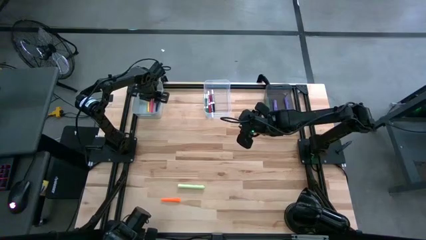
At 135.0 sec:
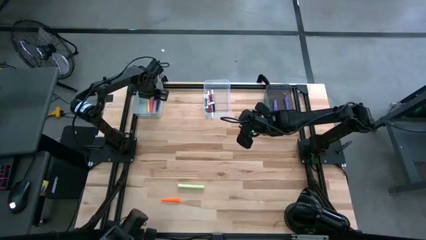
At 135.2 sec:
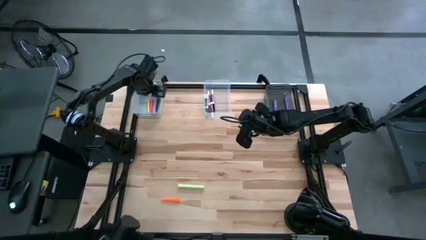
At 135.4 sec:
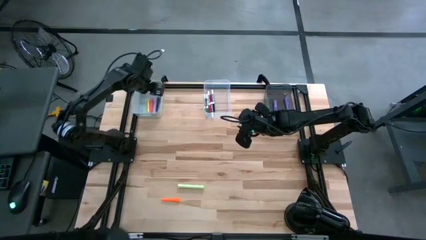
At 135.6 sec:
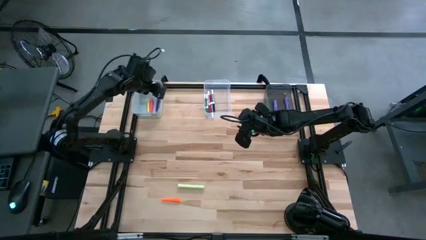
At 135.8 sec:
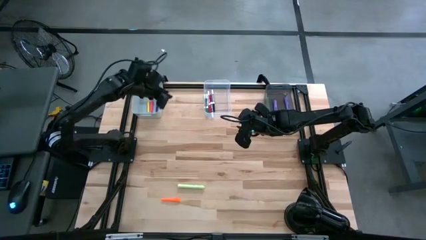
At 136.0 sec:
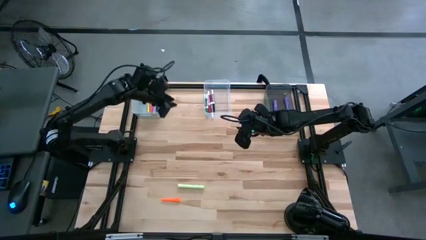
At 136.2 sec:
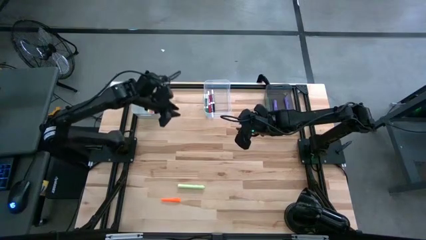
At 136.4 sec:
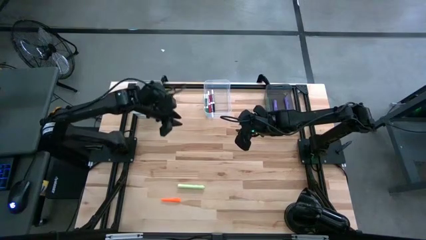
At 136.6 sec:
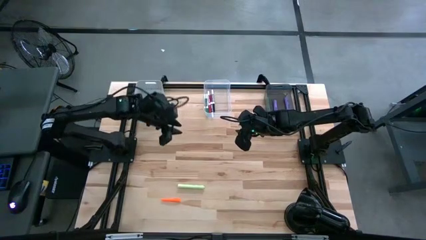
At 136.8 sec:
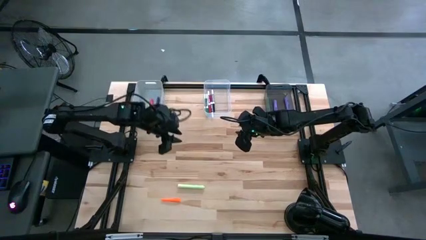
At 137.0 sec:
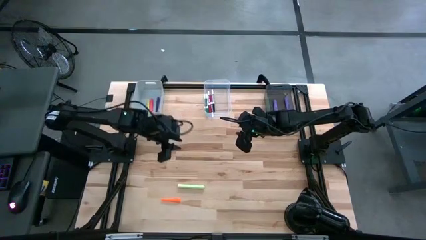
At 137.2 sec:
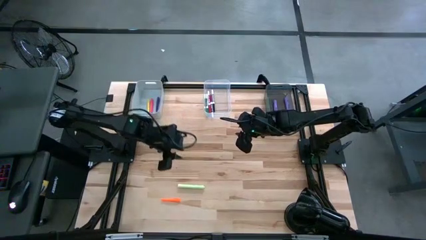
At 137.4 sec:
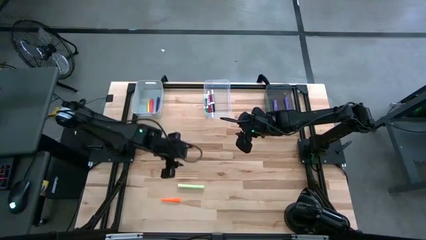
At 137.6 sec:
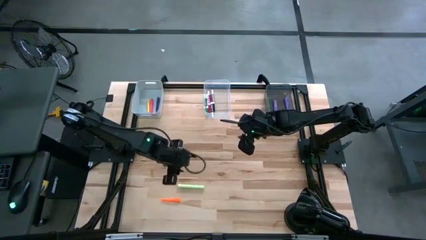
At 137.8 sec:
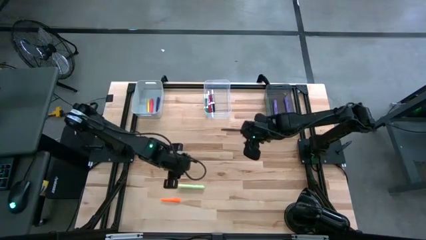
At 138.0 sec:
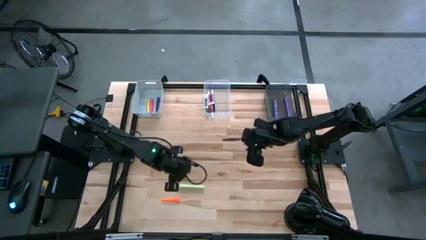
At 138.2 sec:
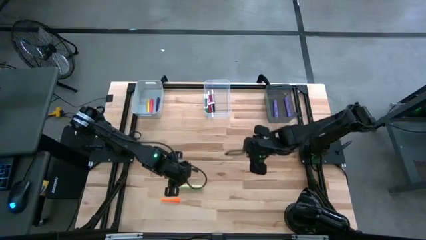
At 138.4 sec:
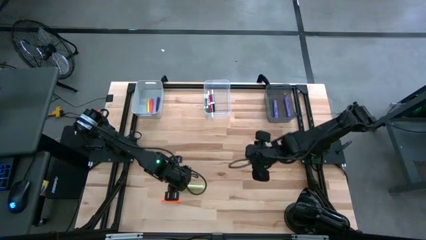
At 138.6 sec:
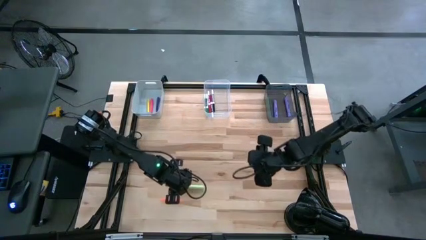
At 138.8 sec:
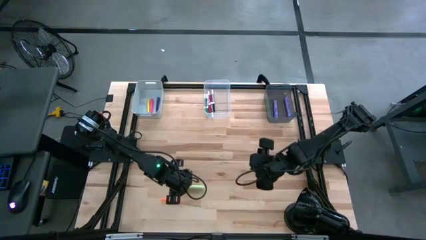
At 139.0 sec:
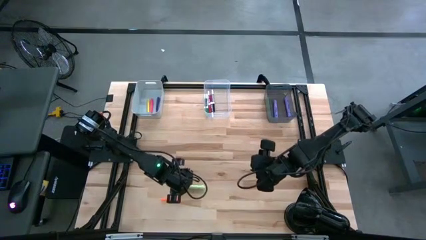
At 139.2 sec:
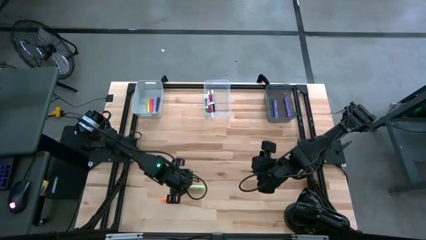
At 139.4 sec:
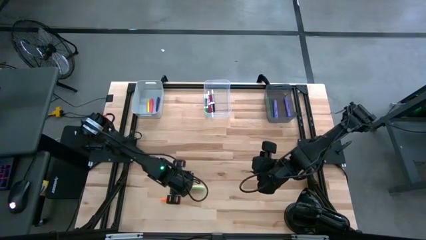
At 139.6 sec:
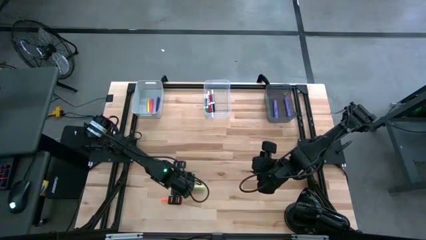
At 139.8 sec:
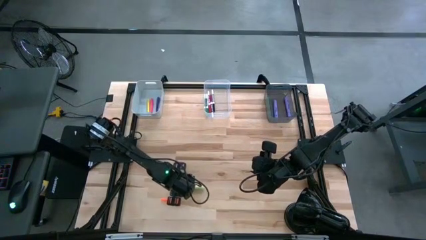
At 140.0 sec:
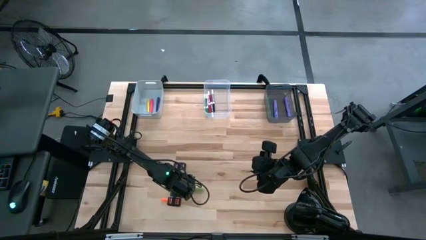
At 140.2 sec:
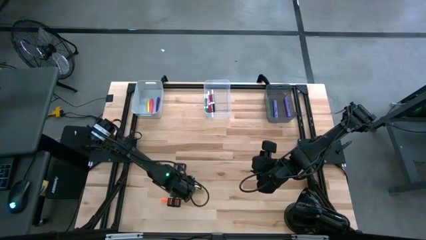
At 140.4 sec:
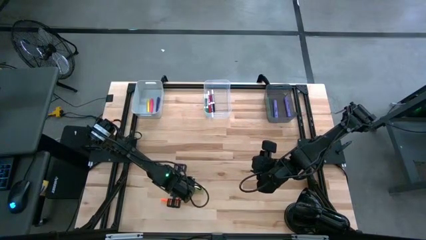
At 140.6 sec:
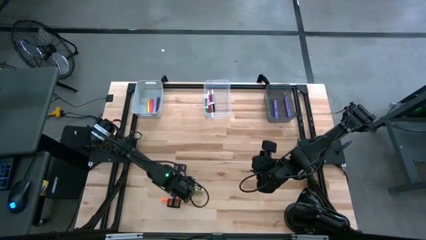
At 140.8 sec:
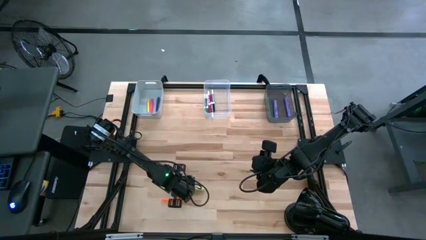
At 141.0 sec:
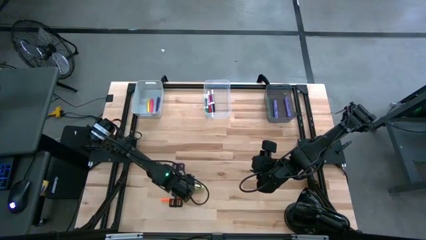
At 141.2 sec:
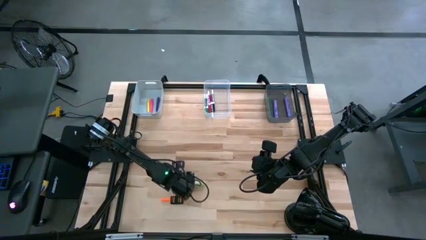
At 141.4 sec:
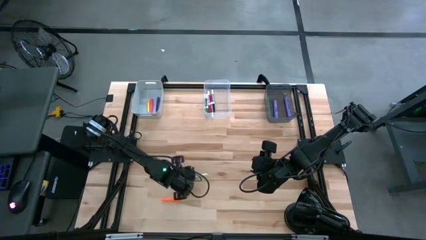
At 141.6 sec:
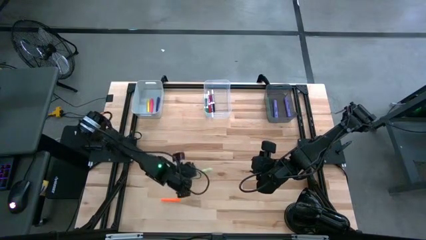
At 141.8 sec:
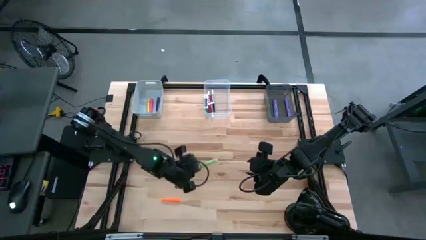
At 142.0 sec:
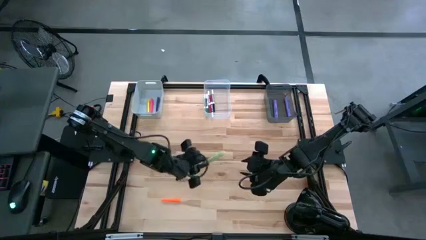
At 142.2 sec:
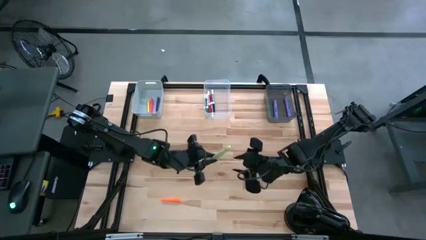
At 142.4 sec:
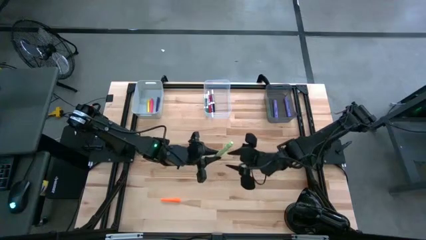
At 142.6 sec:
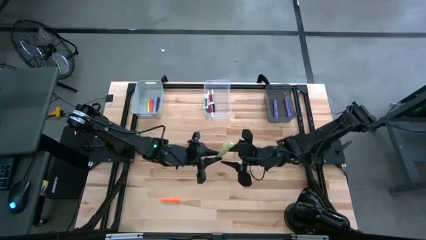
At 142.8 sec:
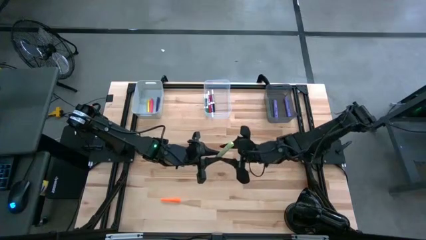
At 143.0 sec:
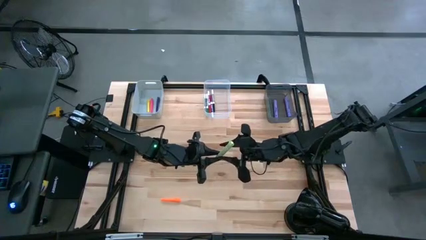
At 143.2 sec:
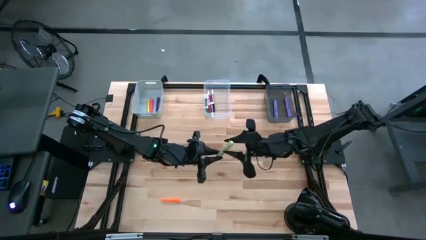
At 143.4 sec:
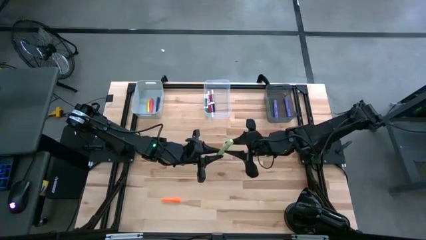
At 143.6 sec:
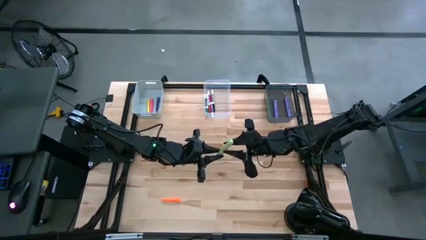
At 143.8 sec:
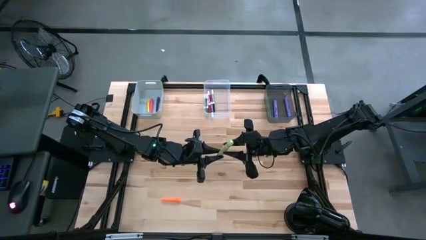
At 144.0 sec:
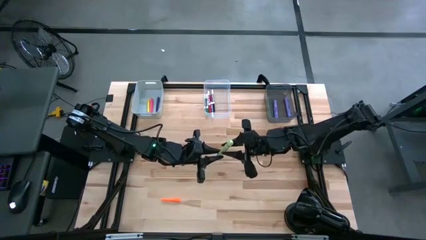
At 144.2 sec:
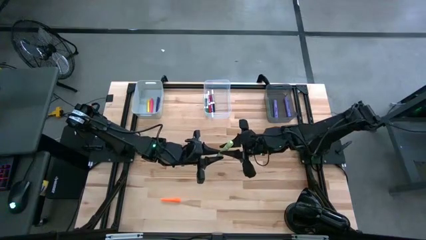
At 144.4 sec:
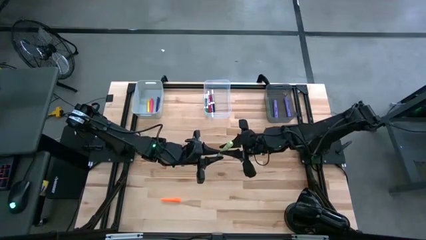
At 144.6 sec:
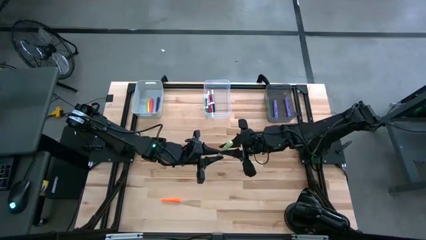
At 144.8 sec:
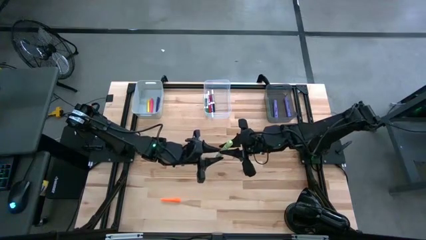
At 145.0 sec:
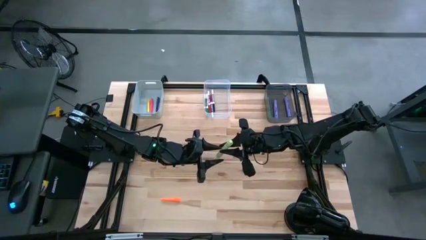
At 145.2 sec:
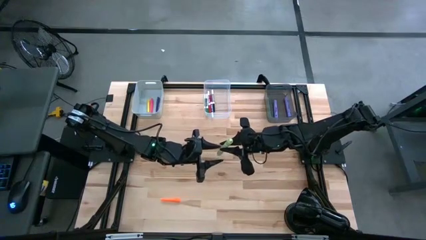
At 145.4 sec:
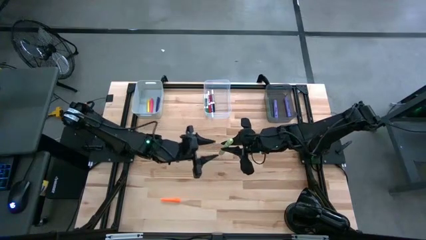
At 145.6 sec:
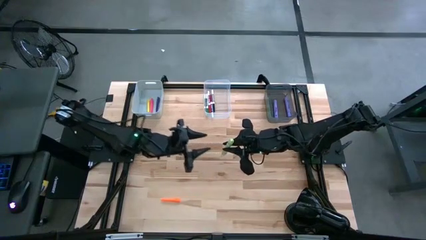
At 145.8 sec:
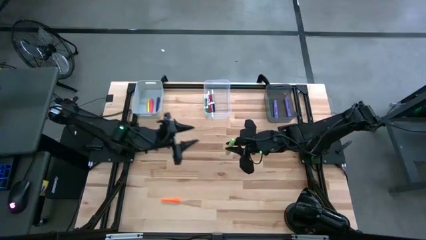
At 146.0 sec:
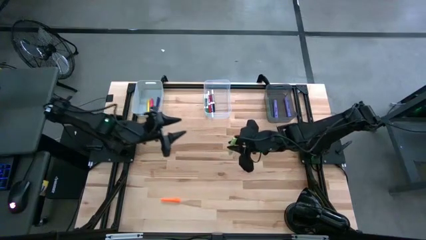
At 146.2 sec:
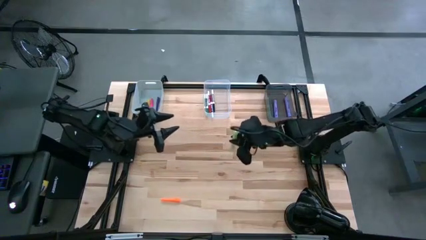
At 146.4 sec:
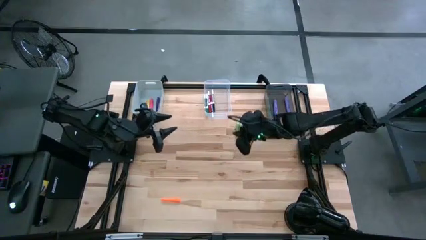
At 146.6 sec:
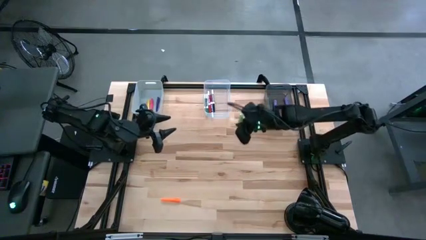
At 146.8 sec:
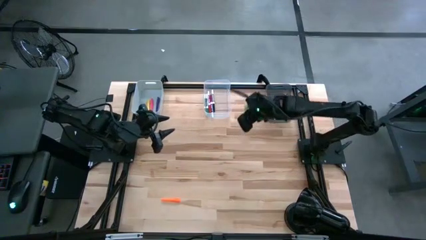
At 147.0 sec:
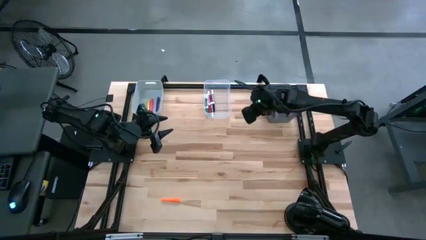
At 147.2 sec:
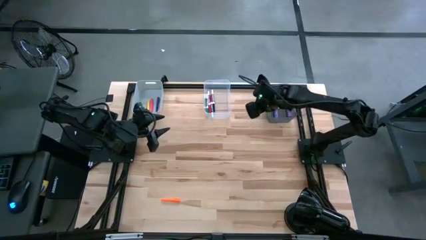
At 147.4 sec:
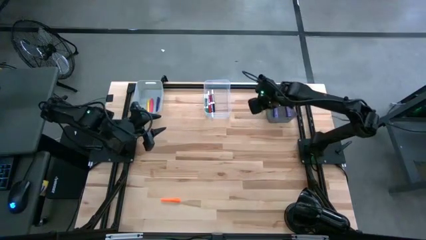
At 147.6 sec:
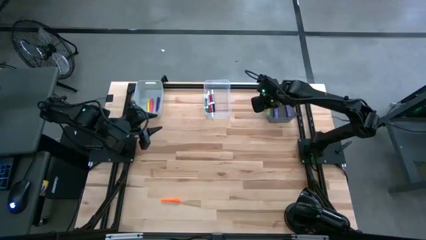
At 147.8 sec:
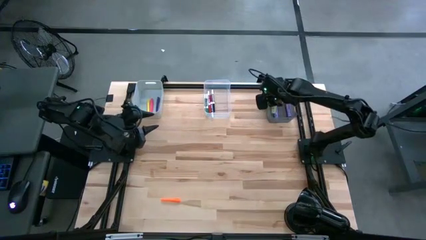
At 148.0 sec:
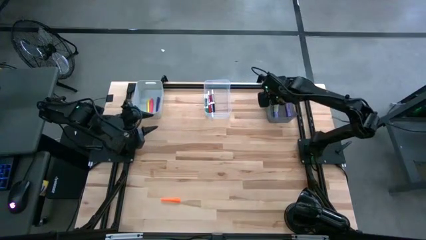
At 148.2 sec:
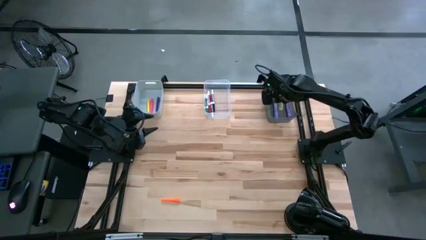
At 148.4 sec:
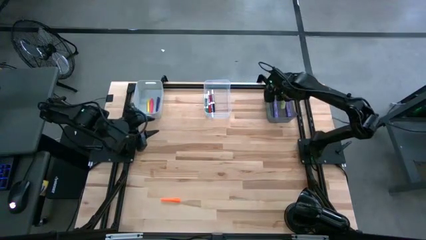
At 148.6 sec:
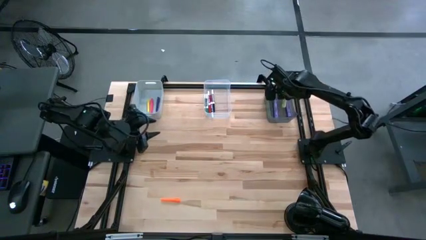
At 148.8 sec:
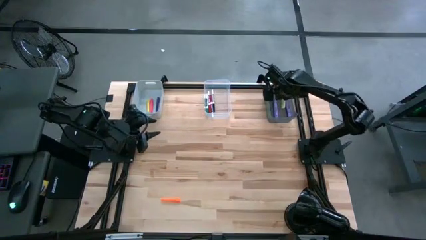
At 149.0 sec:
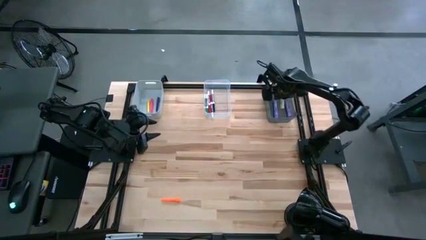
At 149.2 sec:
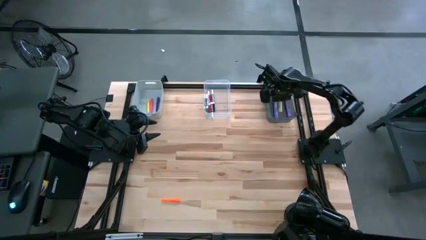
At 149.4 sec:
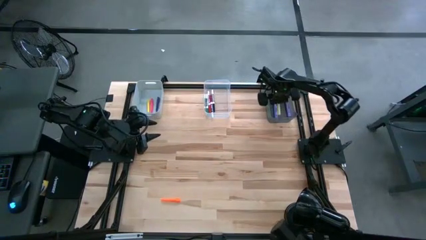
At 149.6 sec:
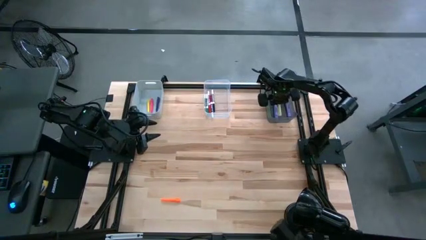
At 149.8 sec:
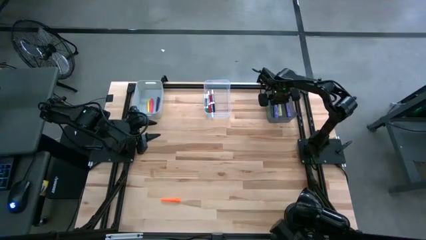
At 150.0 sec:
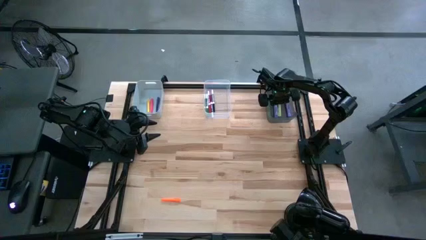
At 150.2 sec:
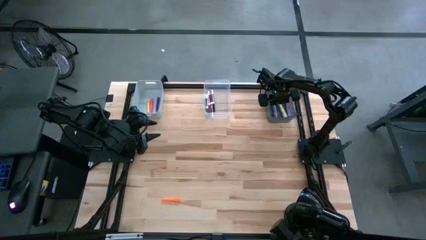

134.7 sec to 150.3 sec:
Task: Pick & Place Markers
Put the light green highlighter pen into the black bin
